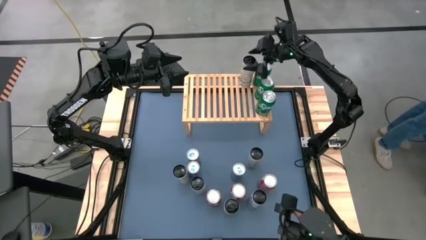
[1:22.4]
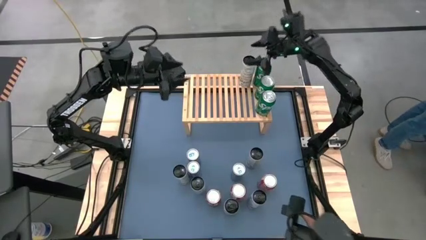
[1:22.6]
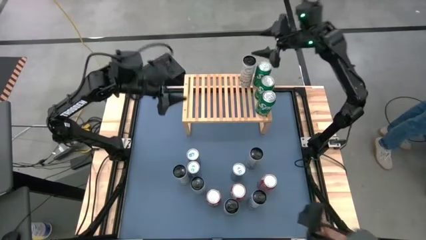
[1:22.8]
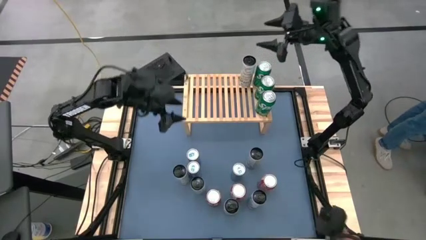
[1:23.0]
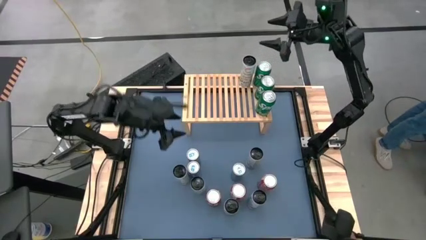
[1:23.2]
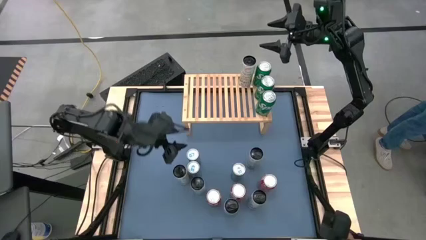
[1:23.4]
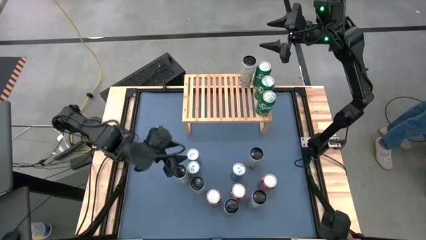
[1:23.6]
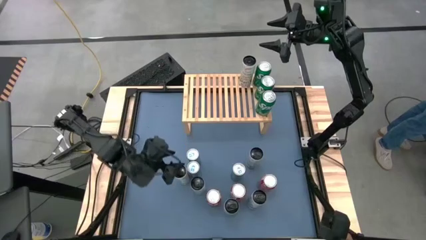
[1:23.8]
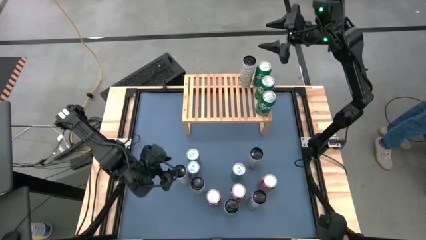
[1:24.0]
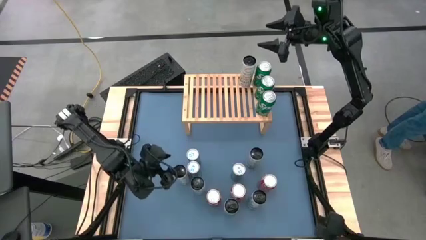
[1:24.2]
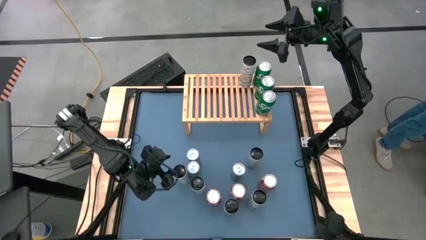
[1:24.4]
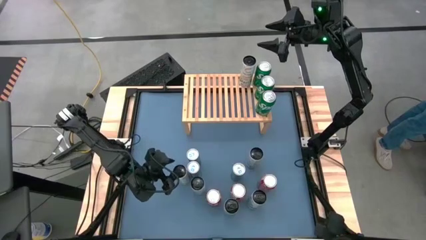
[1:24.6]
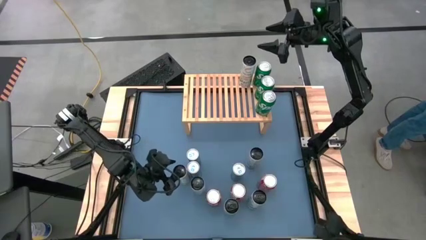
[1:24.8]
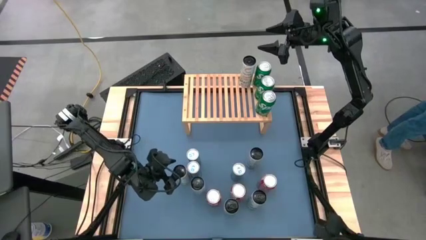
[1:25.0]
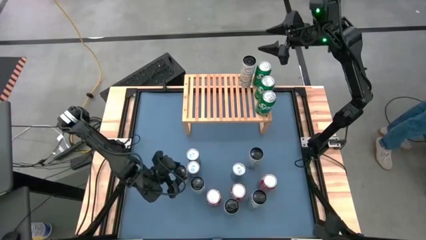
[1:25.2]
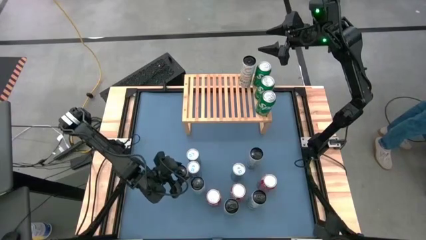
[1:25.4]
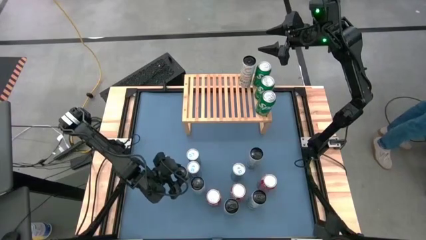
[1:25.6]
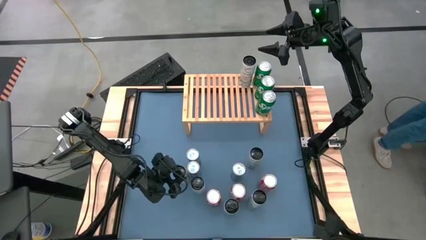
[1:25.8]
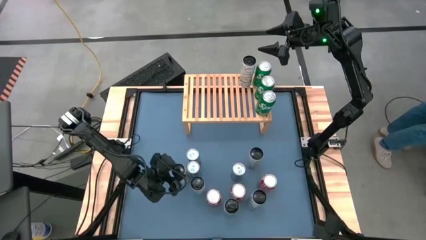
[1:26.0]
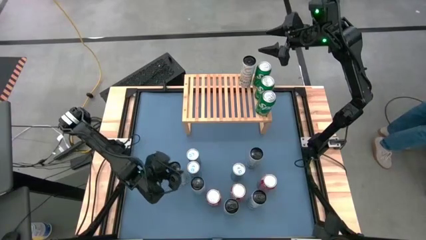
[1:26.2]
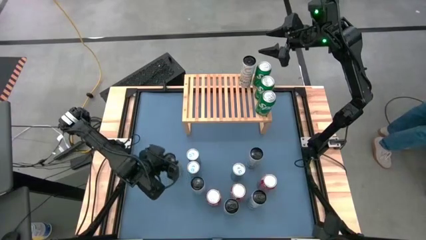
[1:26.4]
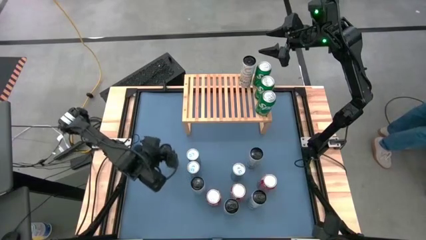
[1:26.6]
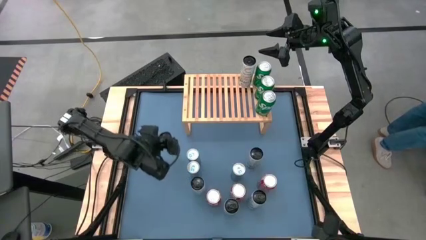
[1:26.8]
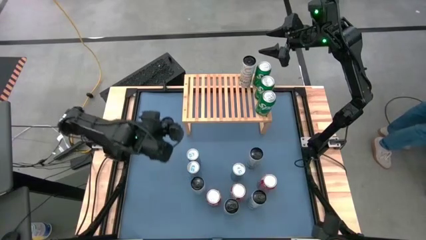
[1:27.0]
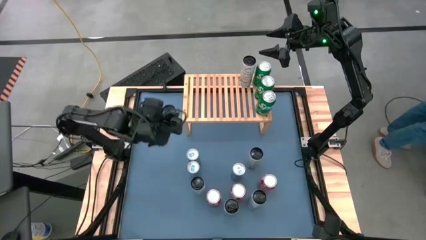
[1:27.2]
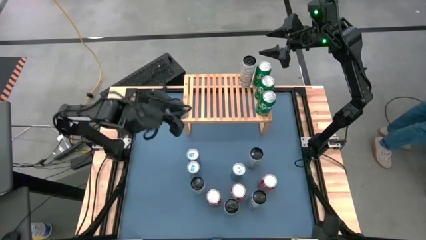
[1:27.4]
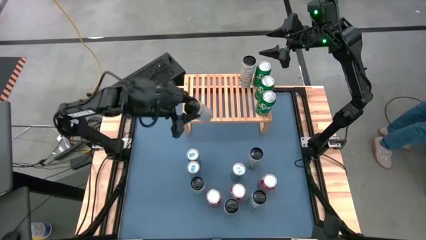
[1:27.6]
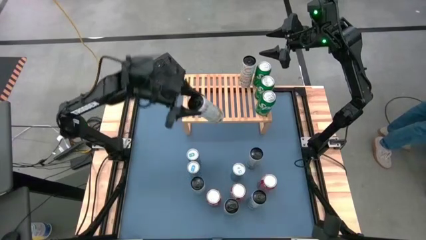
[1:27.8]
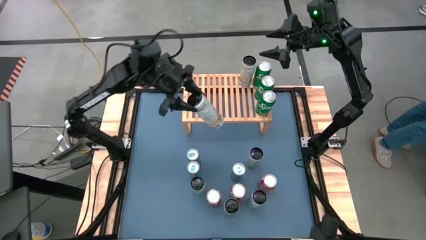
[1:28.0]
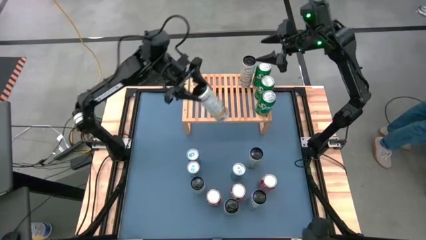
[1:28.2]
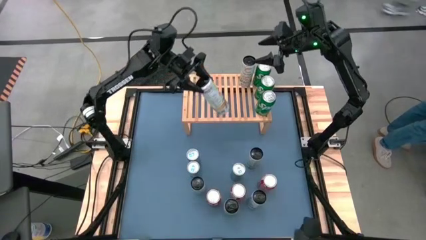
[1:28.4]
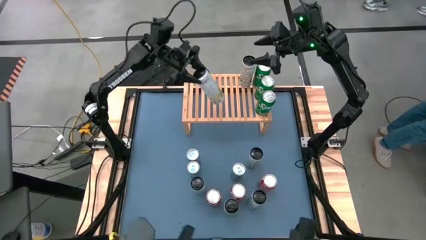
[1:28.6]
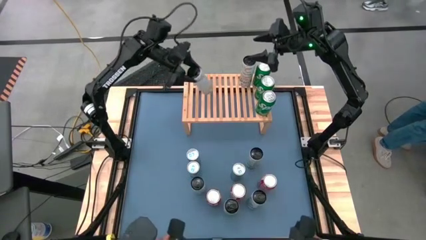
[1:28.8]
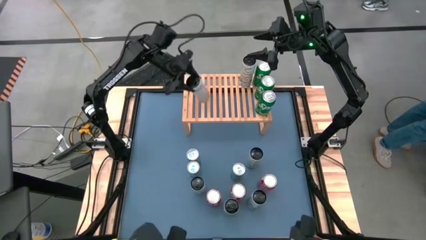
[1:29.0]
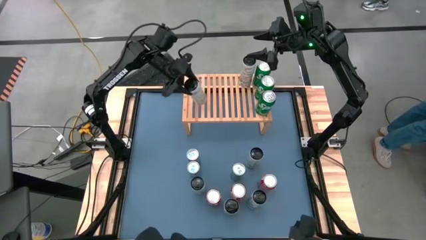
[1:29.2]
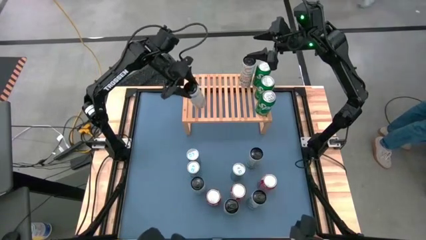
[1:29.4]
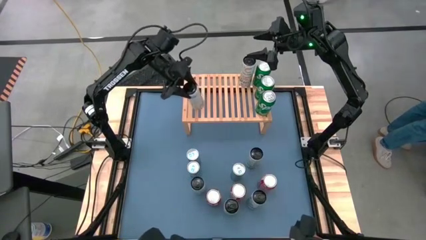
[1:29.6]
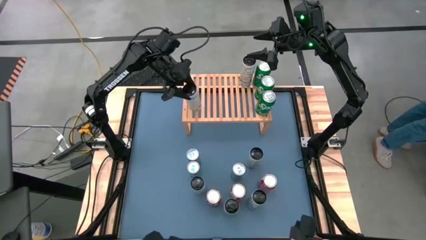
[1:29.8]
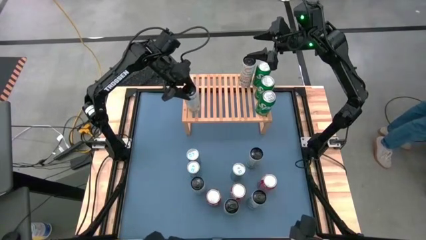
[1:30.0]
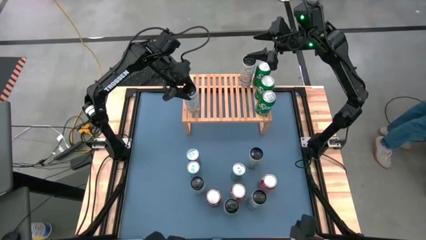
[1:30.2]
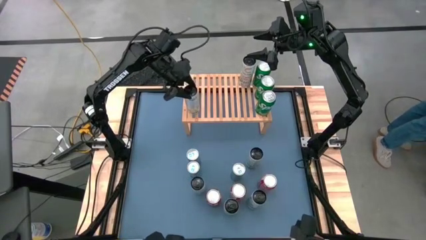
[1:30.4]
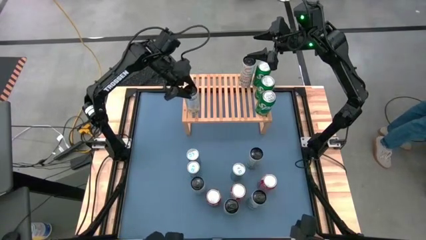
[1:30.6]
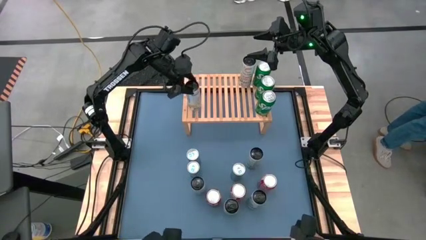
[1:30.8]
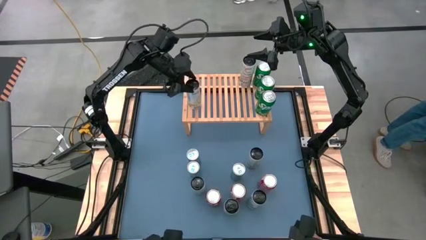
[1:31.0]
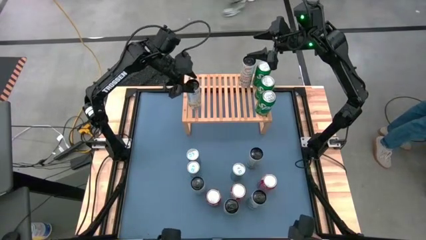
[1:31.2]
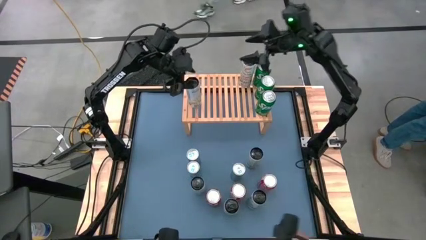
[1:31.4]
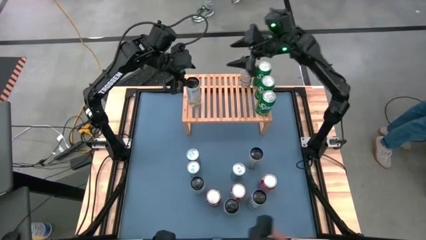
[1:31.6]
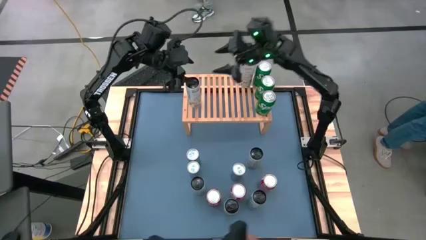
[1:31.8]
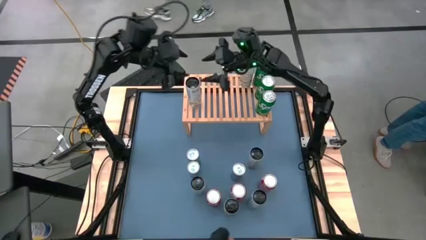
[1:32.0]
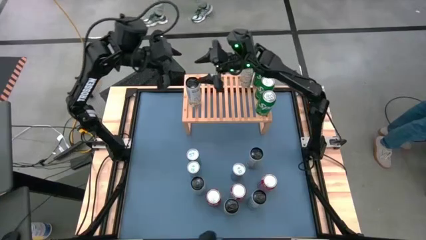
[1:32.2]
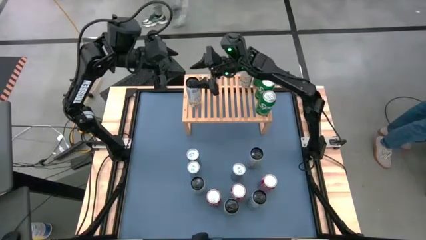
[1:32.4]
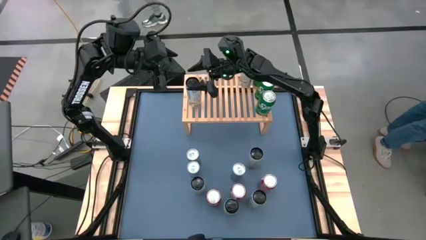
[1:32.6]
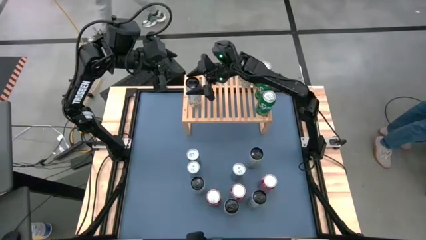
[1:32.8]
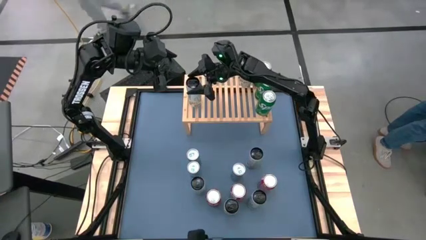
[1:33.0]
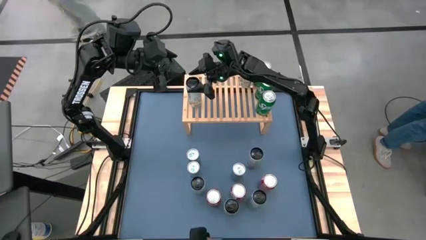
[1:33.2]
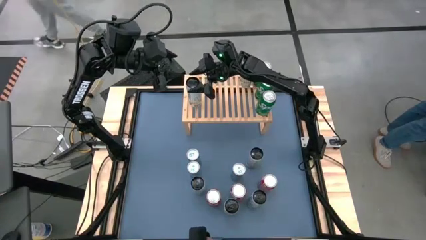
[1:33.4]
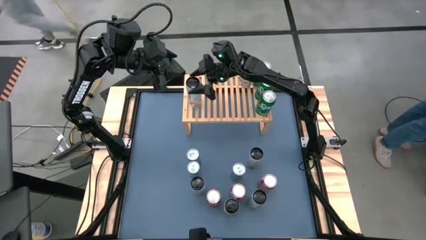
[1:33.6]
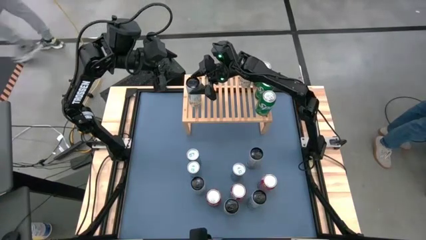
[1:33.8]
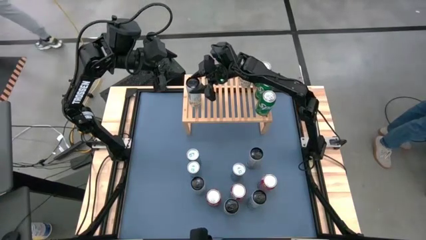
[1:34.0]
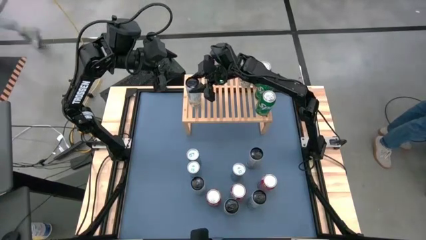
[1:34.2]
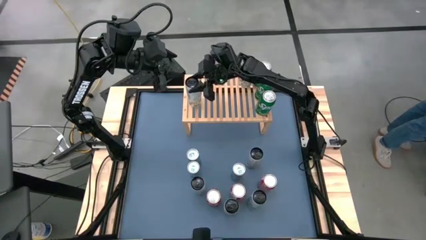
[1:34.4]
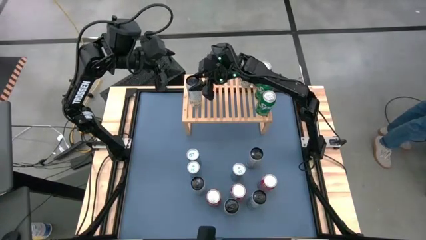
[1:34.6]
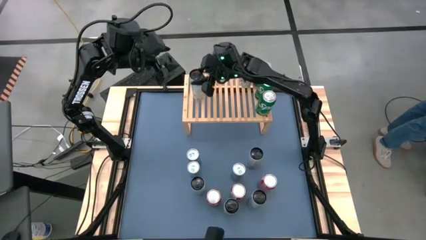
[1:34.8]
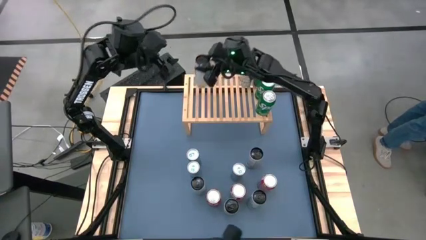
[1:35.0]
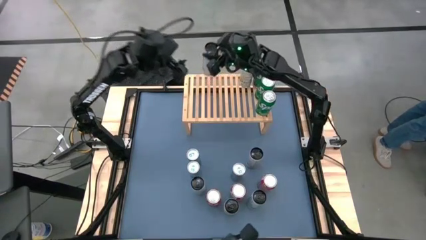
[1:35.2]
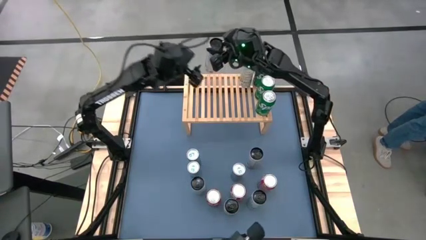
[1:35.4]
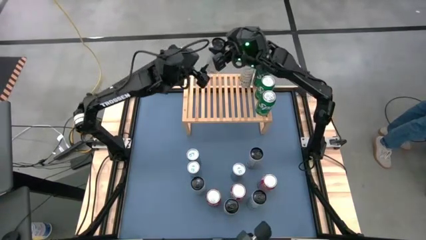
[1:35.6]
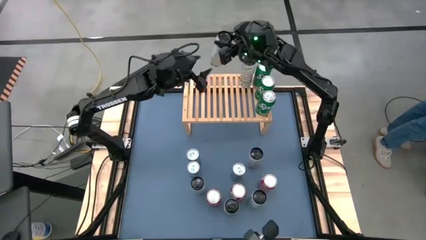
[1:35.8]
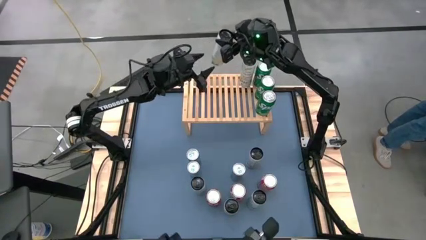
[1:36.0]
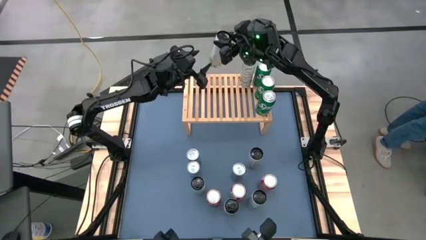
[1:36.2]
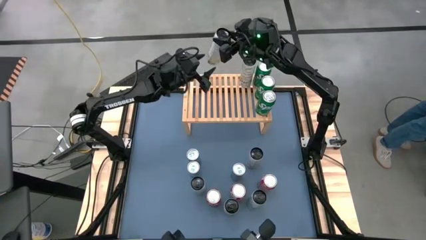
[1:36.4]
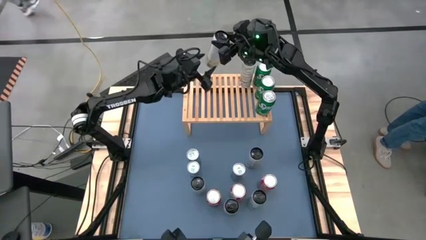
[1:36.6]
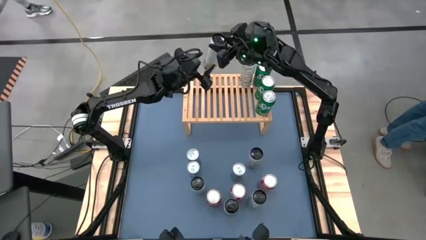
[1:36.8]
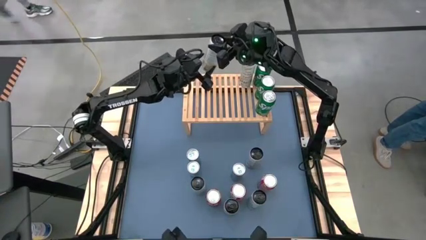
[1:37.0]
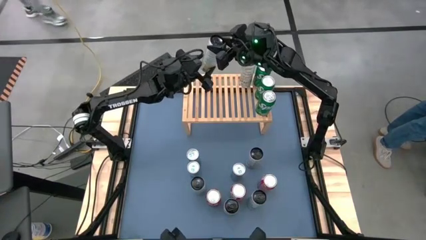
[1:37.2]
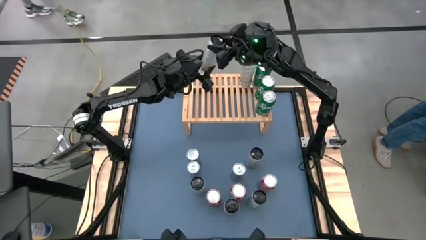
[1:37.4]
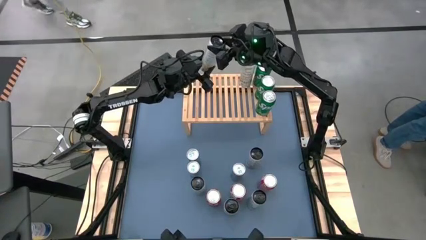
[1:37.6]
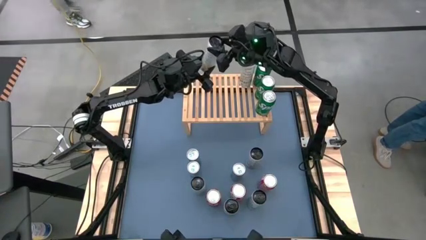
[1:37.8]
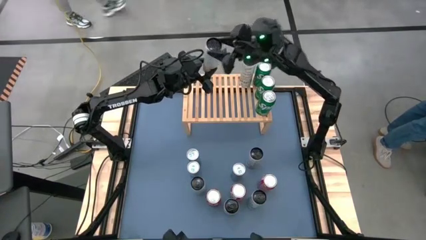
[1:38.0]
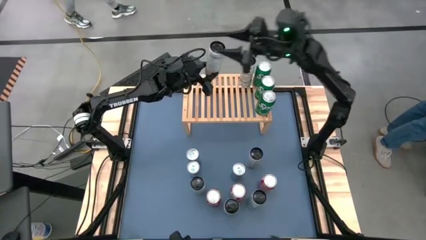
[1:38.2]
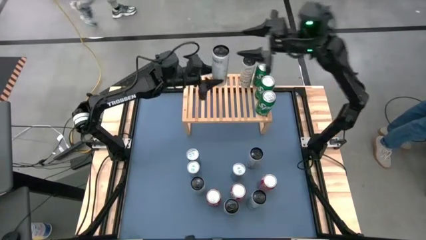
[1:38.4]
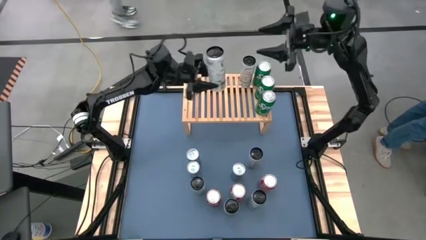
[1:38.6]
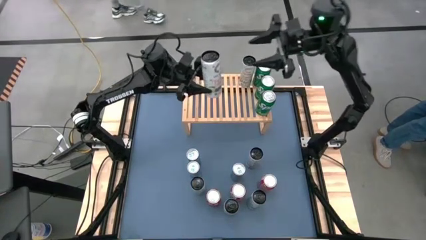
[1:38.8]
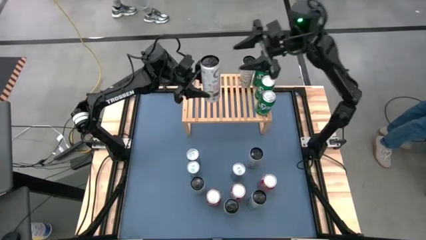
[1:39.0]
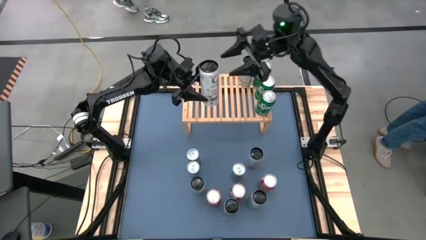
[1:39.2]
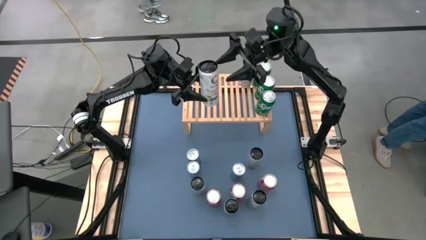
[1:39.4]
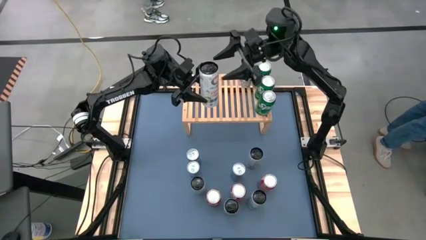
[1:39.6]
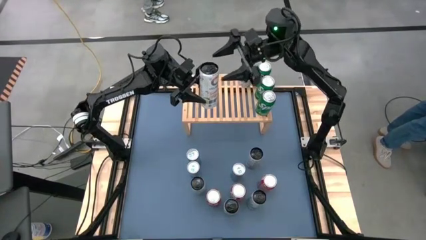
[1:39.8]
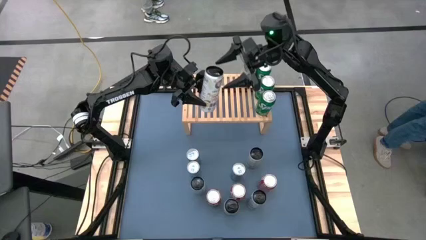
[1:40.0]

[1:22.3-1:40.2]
Task: Place canned beverage on shelf
Put the left white-yellow soda can on the shelf aligned with the other white-yellow soda can
